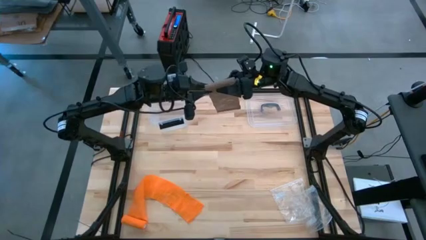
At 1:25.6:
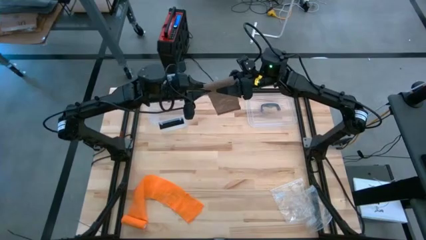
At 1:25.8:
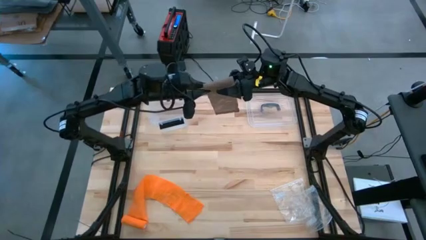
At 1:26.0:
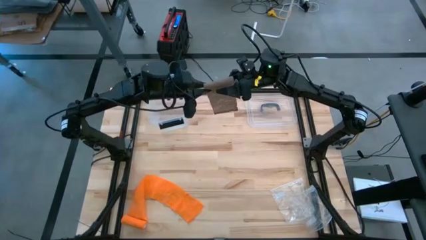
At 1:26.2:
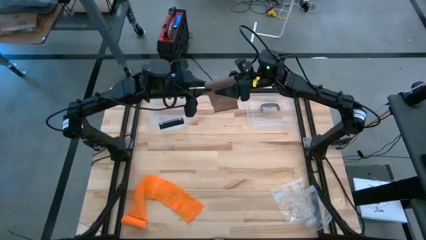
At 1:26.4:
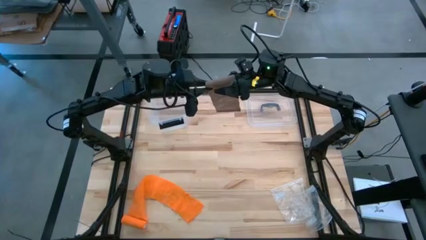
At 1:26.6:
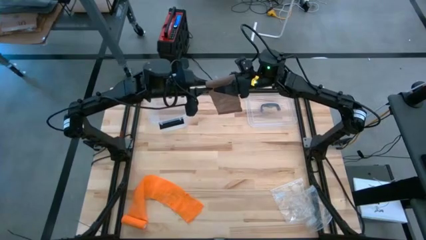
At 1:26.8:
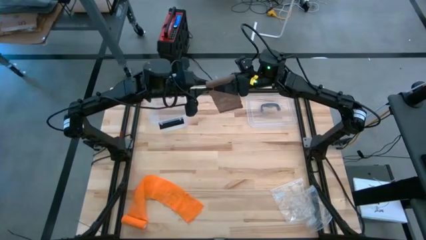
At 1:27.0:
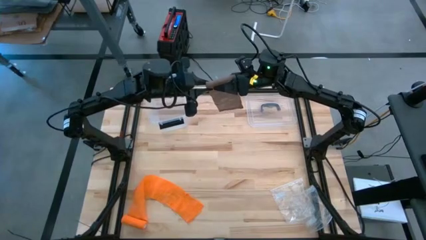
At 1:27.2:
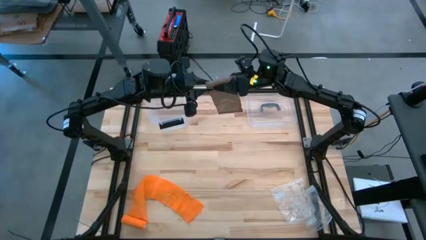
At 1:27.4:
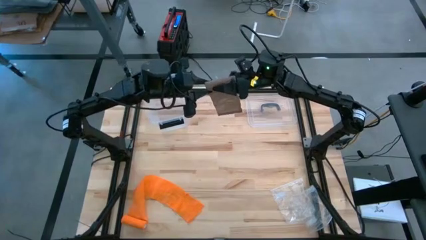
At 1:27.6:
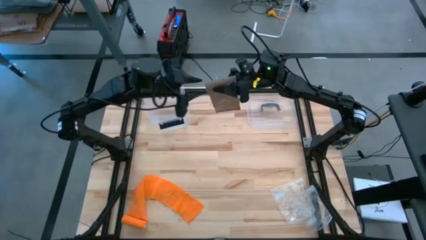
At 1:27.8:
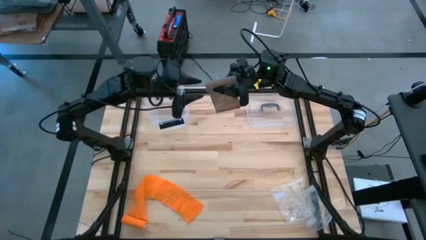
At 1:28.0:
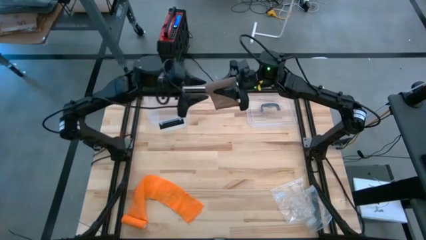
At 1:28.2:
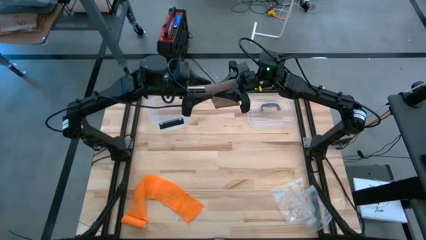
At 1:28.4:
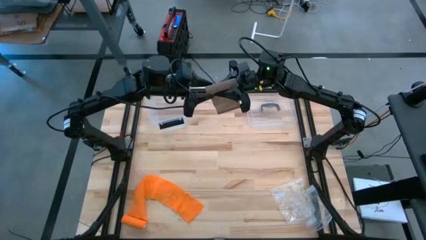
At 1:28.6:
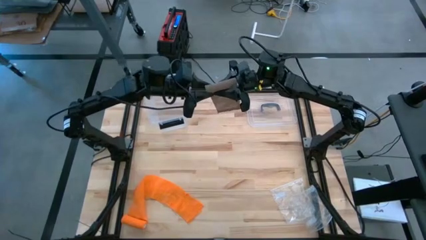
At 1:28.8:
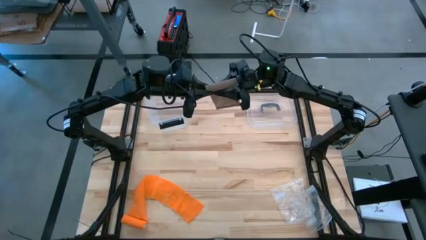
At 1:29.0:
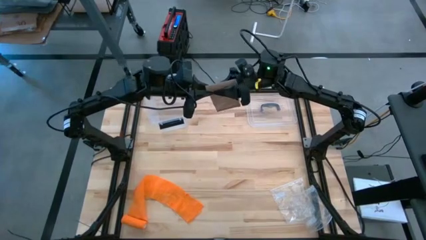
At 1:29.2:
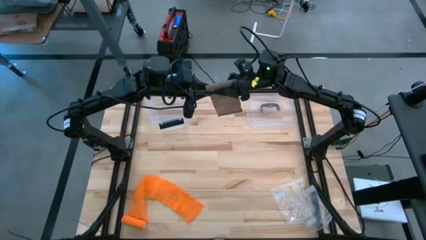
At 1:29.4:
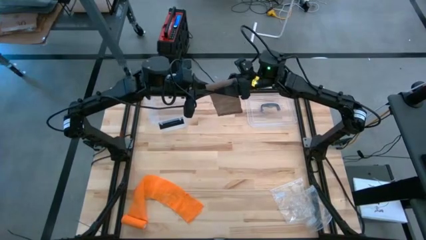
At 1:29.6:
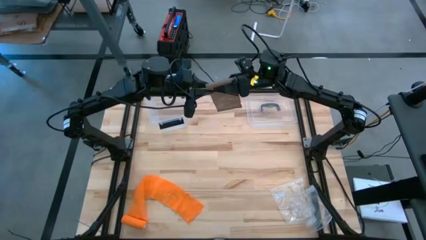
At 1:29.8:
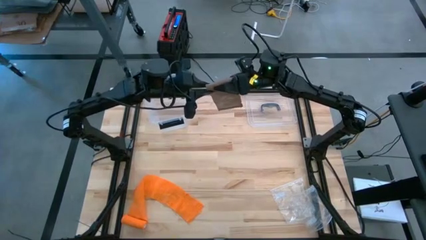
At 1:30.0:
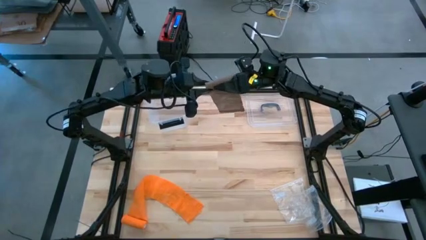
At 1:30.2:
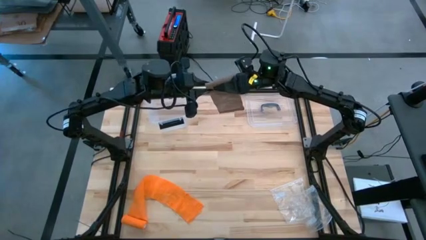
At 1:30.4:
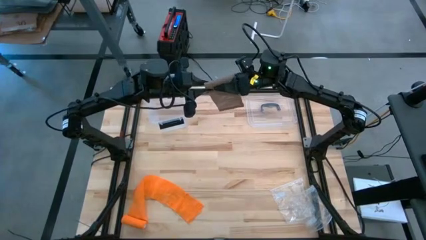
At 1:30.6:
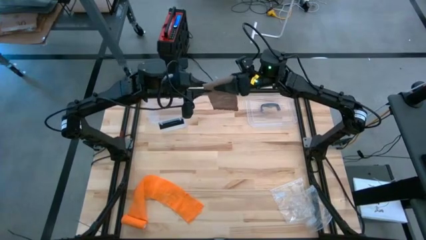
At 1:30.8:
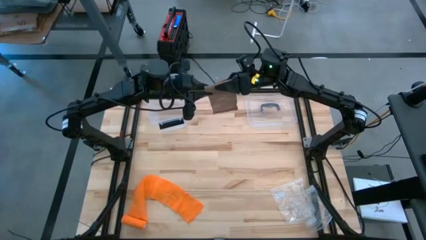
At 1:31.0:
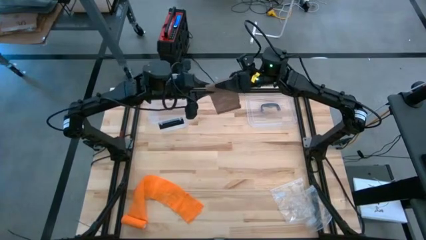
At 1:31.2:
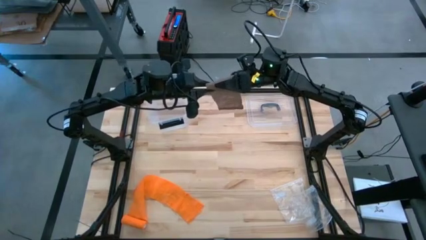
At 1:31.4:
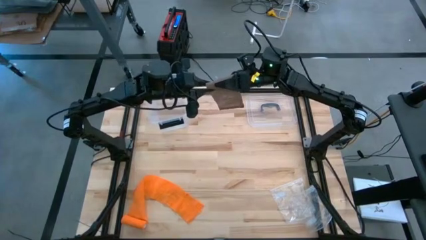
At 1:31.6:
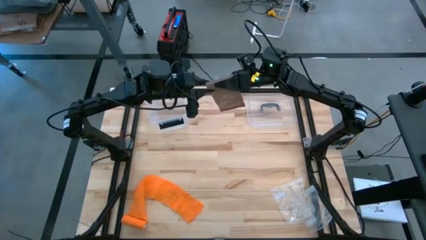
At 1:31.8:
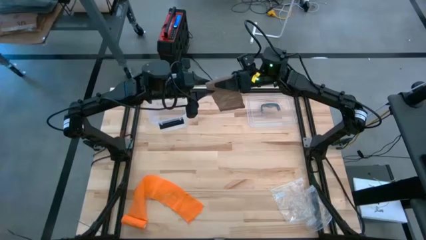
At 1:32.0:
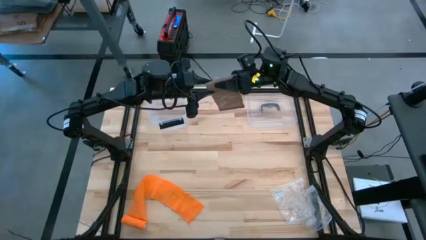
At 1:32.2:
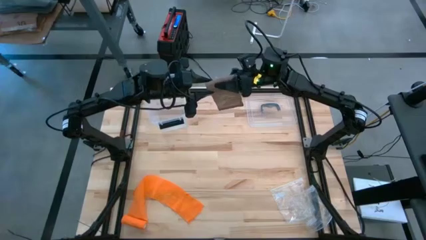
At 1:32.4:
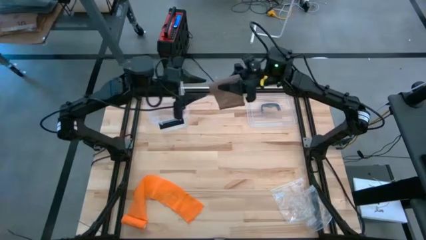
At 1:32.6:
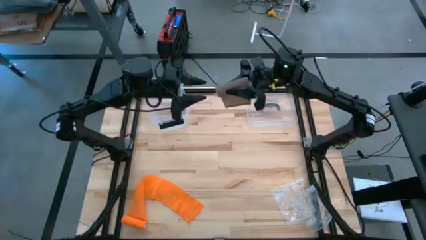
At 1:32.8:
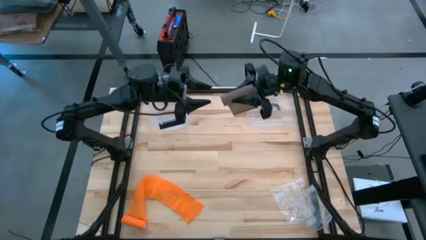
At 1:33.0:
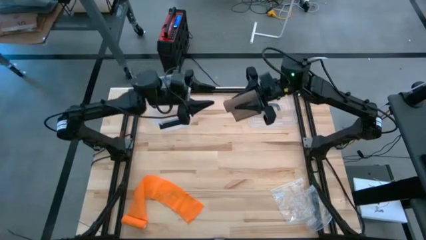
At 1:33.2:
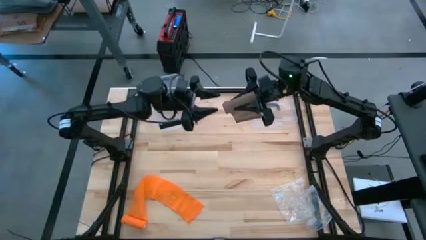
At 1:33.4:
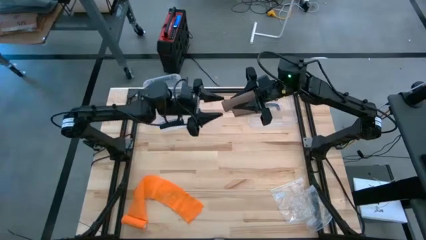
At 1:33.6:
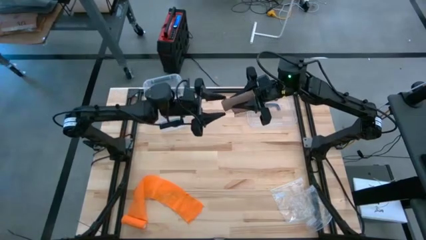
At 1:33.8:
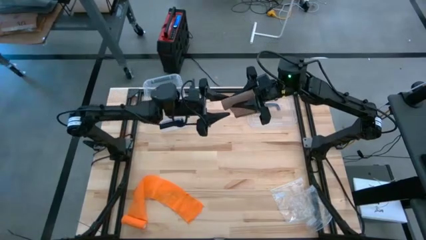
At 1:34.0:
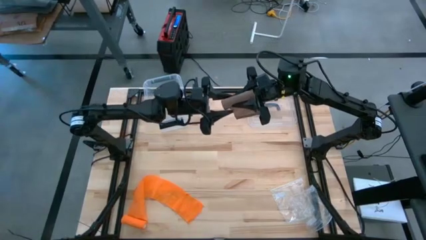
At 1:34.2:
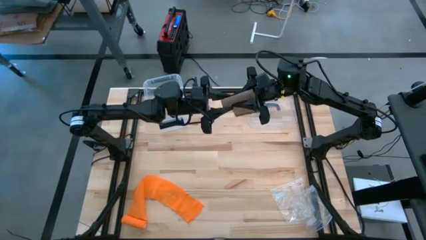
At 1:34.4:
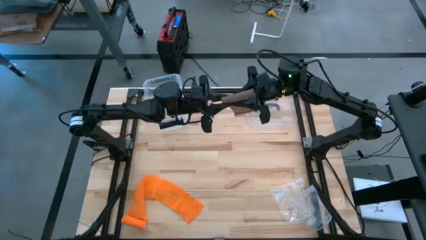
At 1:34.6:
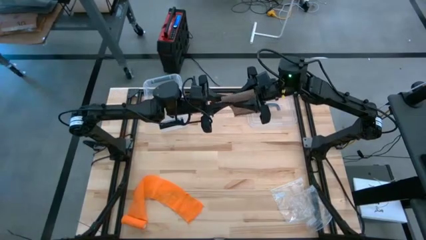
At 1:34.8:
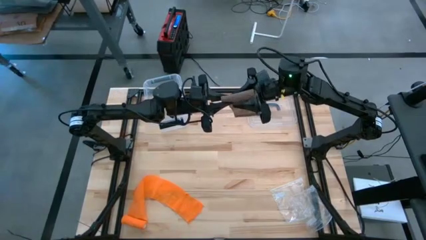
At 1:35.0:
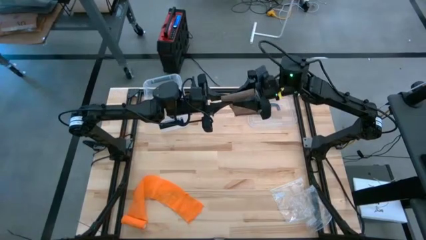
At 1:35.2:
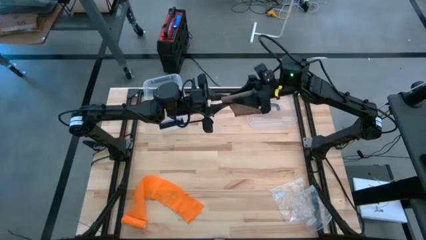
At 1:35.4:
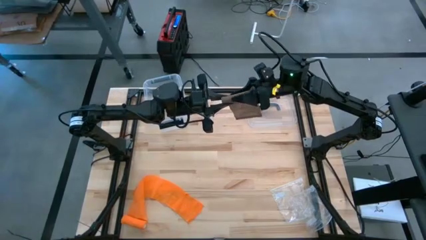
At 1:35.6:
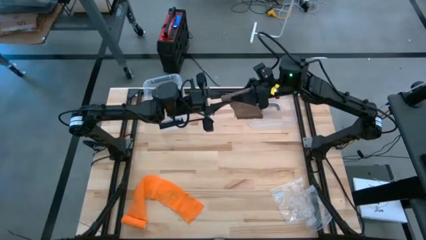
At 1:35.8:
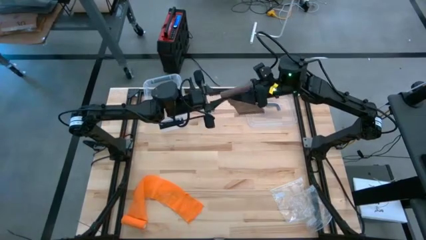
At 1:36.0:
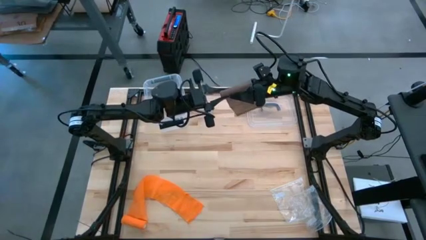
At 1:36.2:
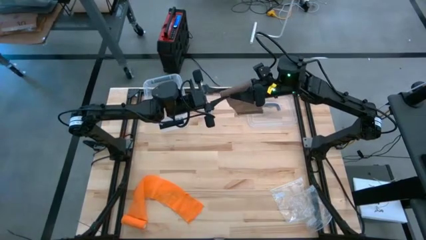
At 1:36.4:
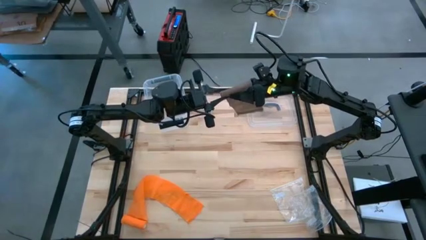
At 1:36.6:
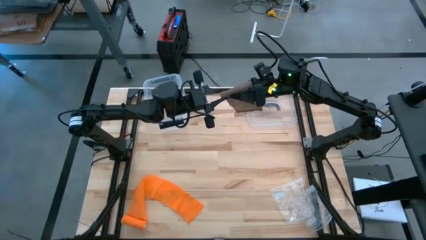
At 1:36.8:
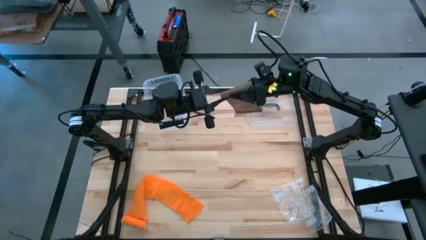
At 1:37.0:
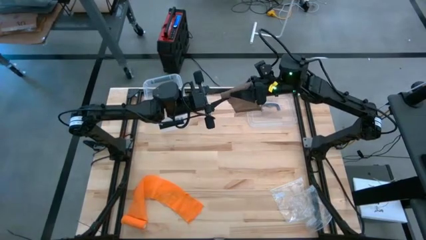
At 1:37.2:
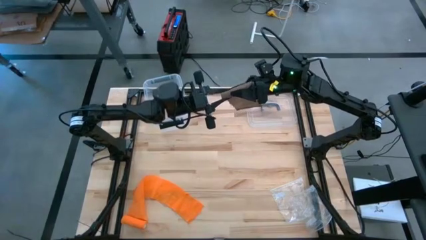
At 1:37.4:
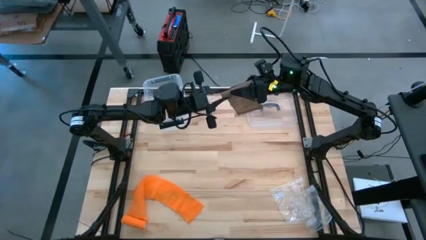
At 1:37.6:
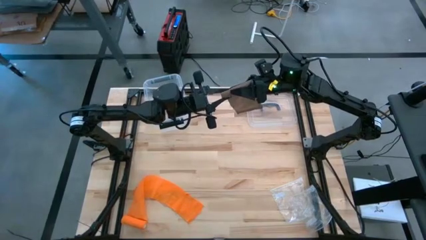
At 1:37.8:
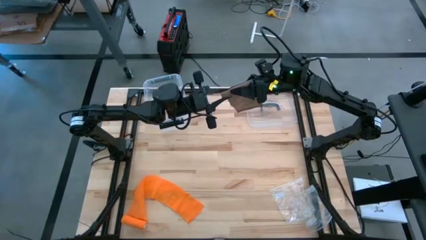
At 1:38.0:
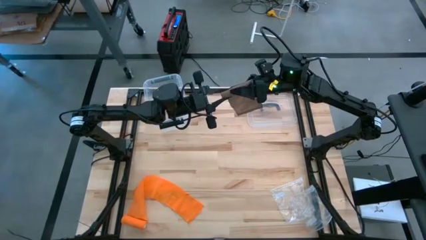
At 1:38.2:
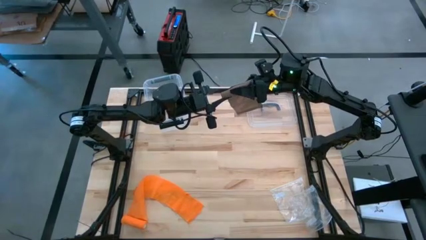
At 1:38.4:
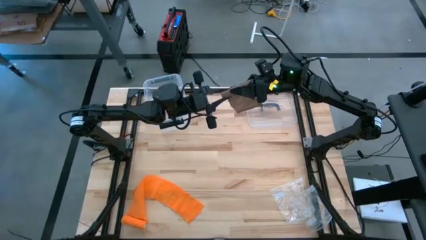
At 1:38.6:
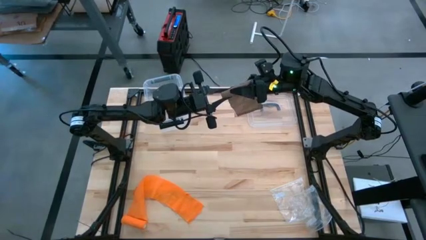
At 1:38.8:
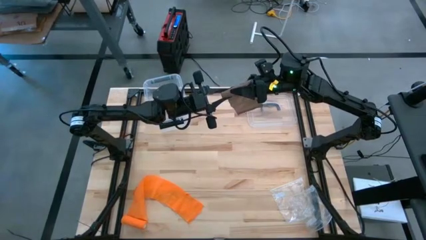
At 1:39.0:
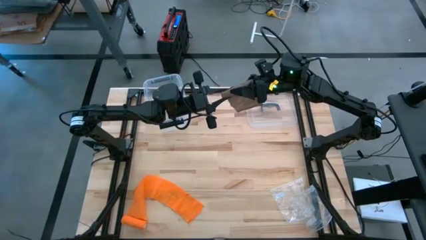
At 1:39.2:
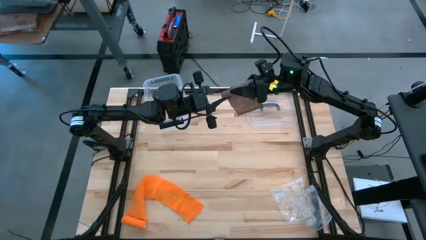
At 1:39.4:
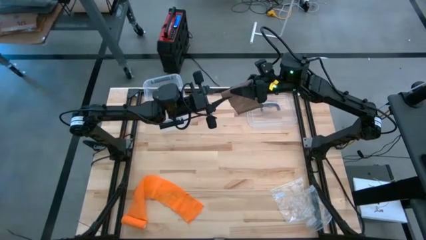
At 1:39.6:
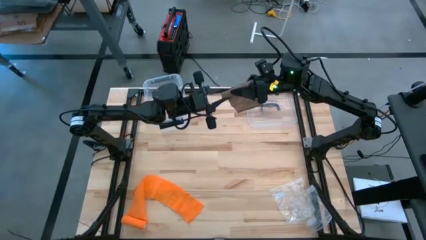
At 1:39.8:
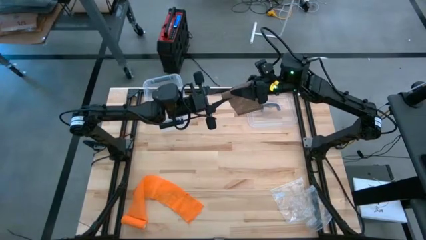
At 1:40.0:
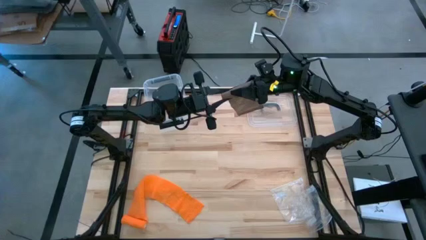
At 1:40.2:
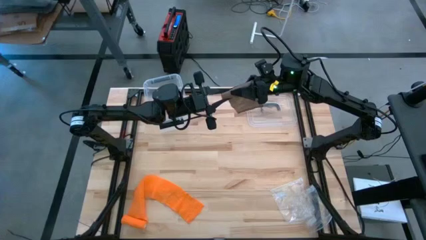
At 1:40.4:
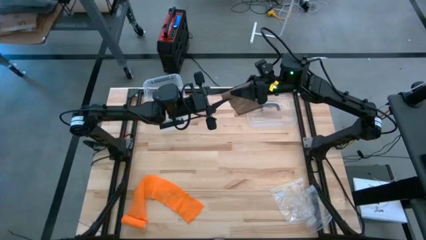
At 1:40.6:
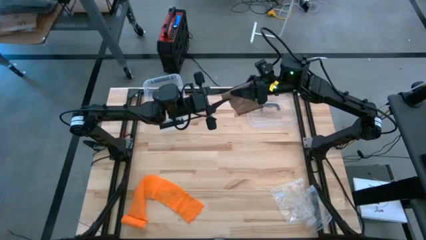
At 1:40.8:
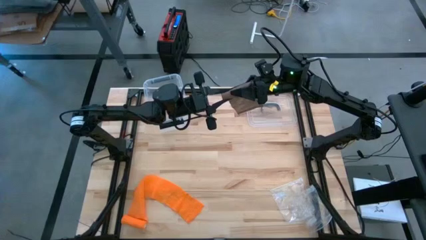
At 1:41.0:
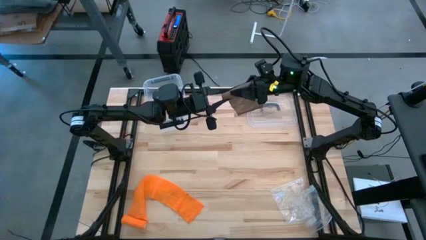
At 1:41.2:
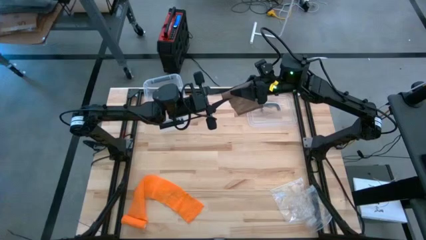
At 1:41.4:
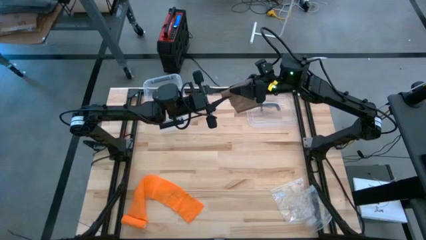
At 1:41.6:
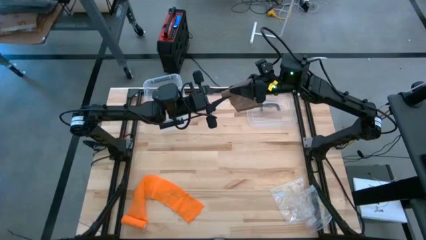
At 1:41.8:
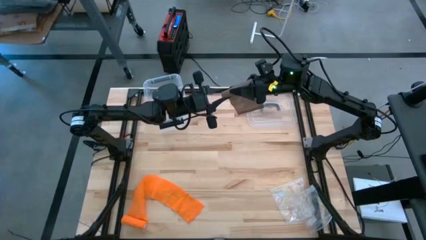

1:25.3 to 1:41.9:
Task: Roll bandage
Roll the brown bandage
